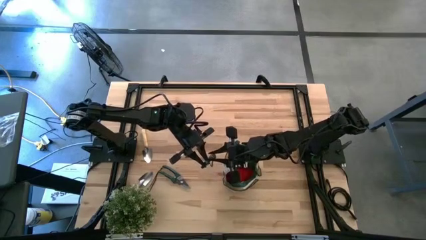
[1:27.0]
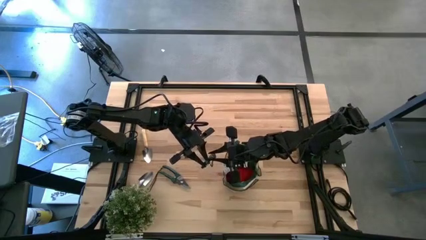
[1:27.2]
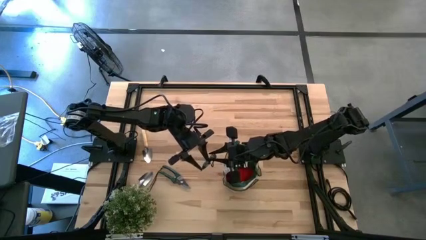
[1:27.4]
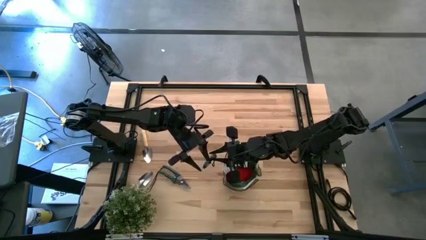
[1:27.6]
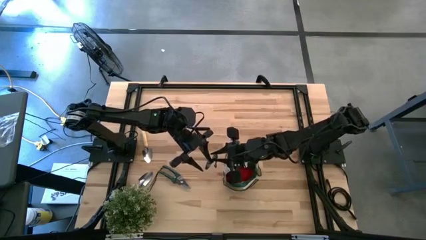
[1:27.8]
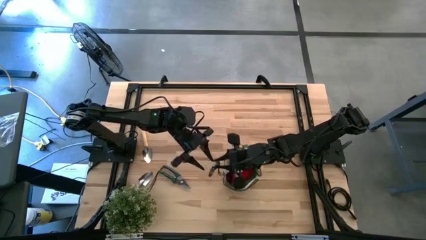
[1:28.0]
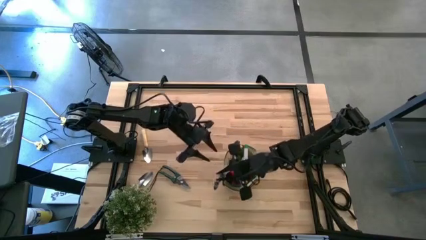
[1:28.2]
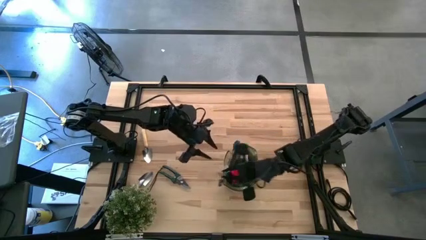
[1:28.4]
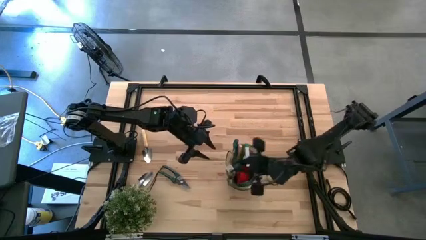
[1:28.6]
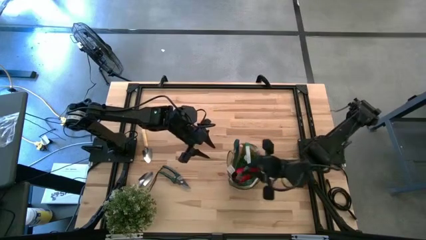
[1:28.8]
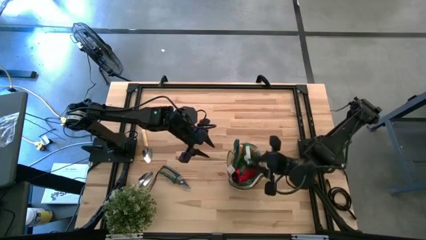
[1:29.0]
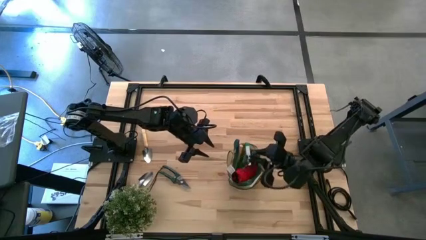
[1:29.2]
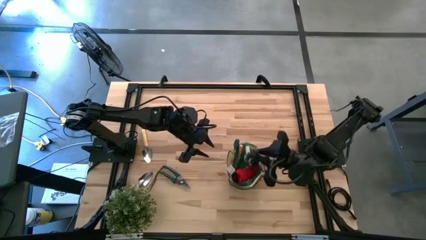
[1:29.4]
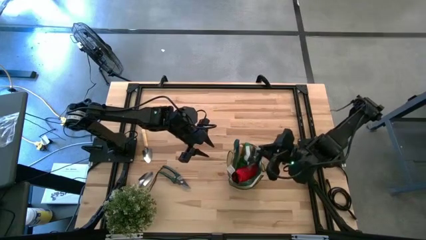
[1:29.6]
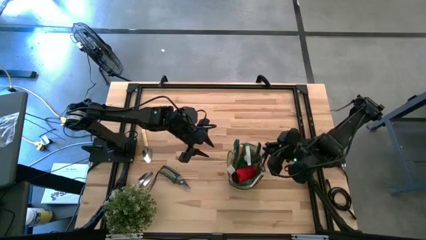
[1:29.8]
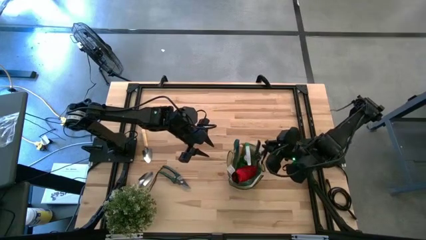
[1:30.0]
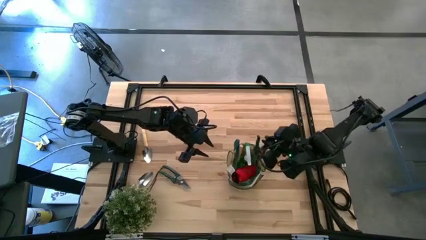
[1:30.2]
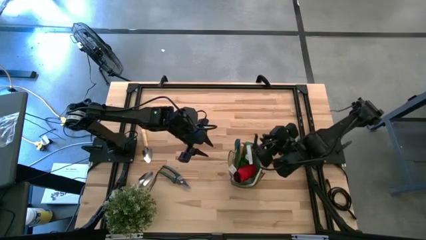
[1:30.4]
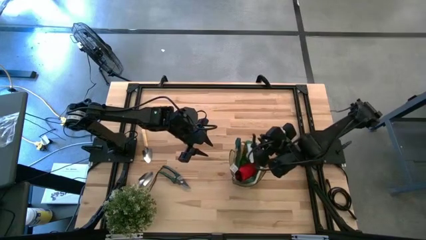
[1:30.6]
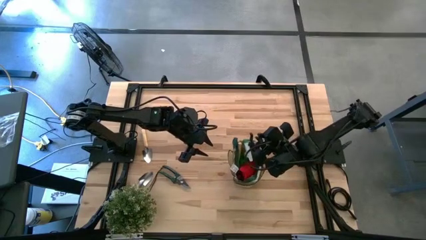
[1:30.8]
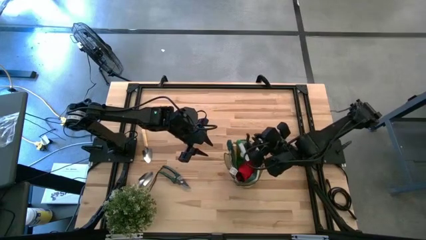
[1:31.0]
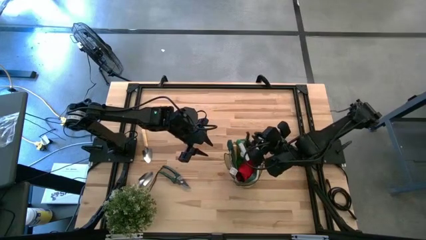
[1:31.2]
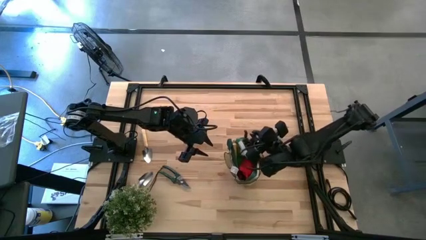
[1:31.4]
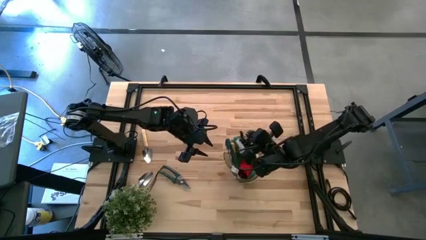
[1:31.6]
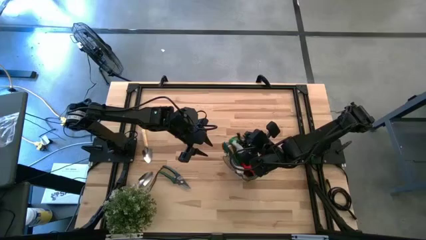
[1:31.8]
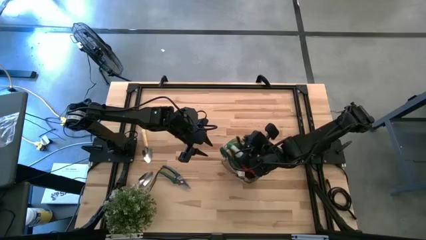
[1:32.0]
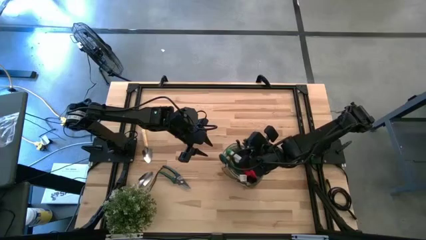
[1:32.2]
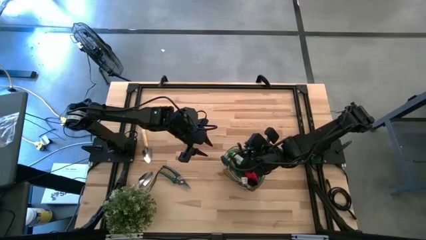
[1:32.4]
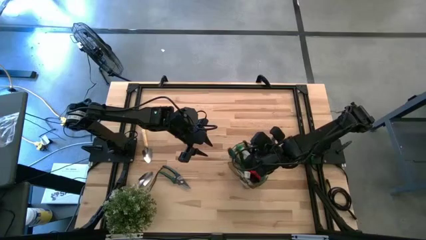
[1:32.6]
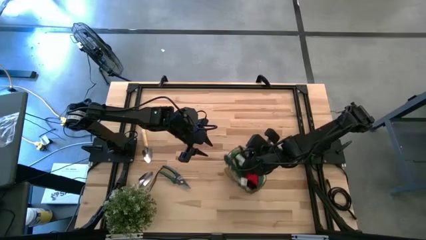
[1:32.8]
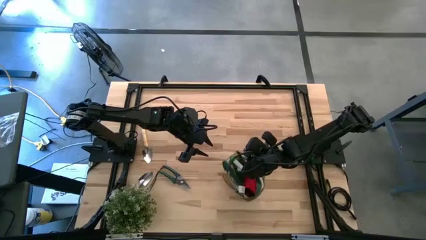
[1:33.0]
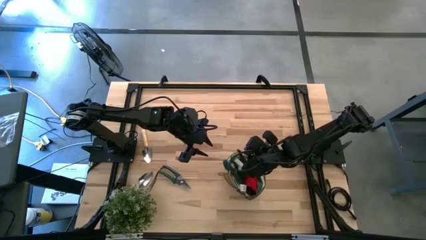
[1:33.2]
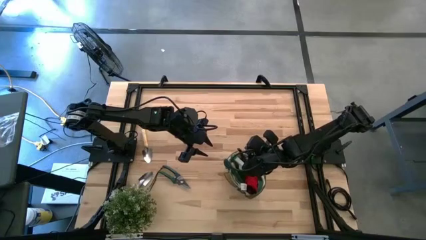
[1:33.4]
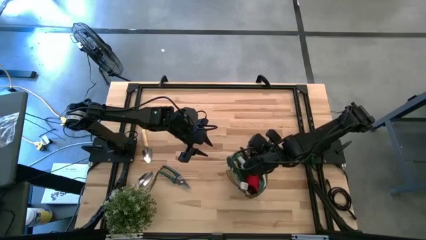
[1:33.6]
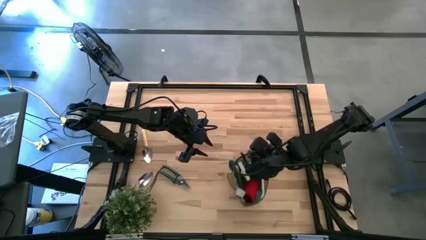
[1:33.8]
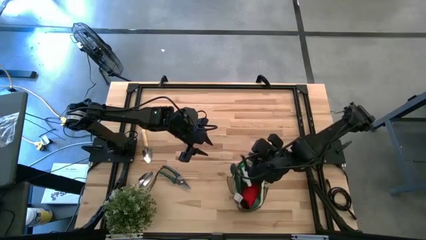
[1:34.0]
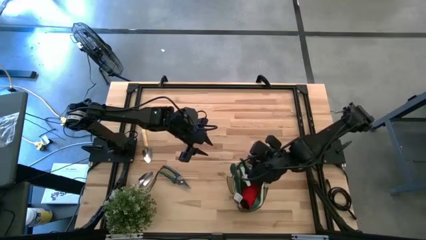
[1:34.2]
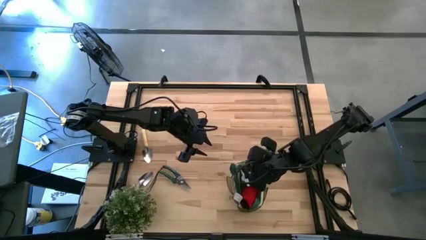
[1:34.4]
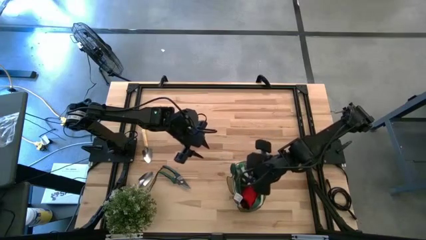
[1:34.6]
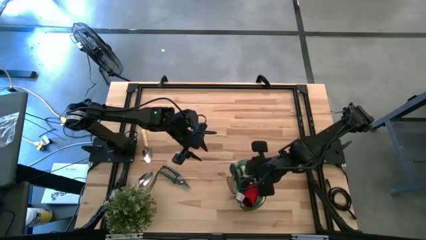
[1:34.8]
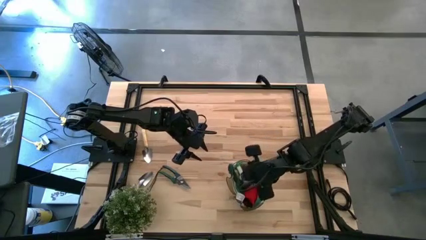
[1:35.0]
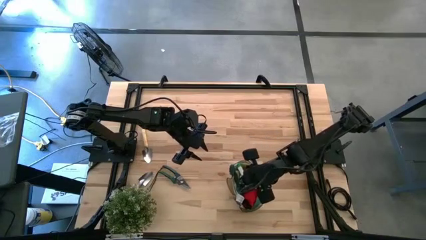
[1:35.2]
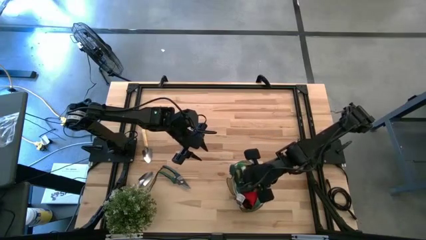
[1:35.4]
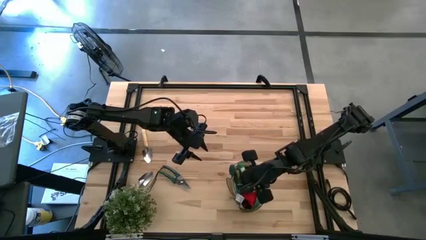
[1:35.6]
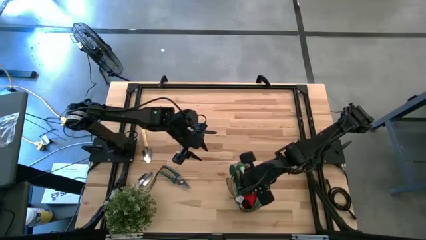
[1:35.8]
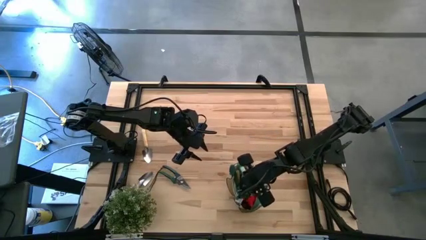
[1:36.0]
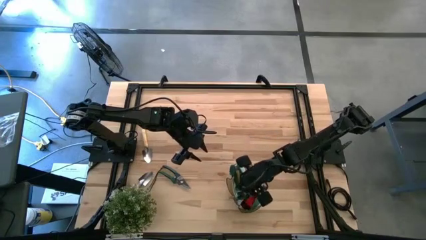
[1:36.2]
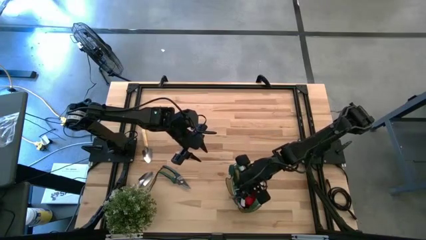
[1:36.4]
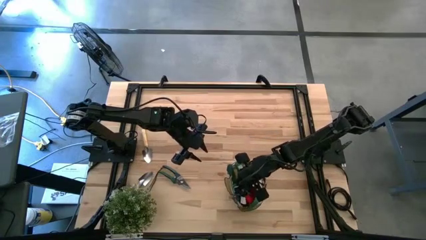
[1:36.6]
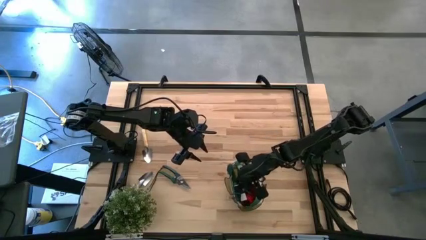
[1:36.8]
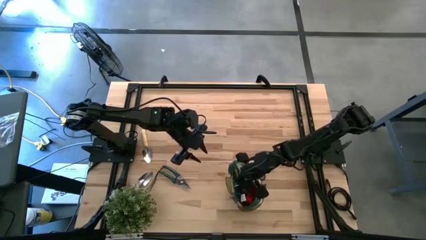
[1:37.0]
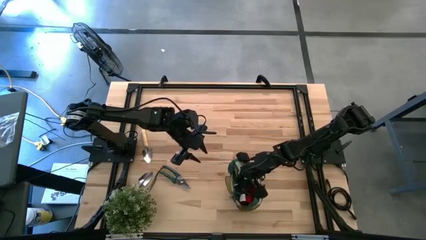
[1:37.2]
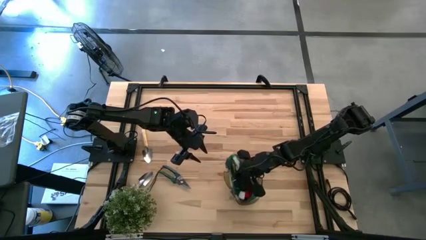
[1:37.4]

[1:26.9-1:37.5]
Task: Pick & Place Garden tools in Gardening bag
Put the top green shear scissors into the green gardening bag

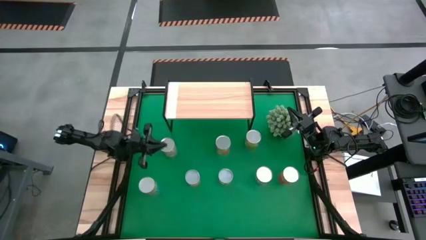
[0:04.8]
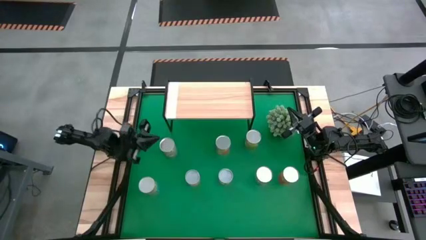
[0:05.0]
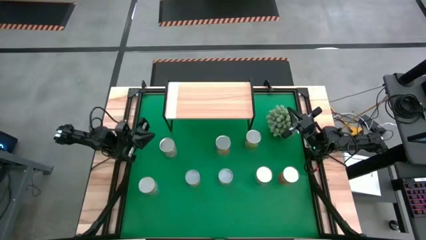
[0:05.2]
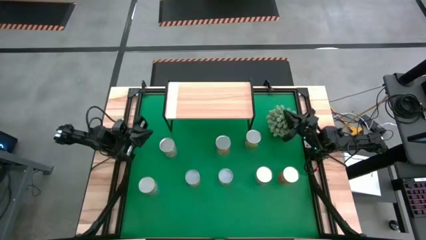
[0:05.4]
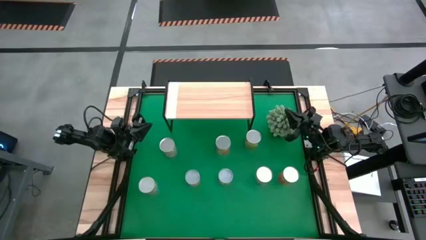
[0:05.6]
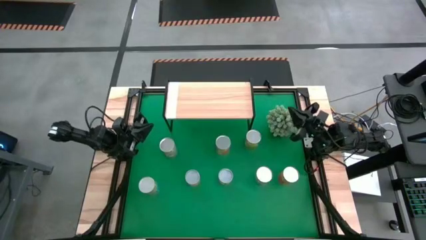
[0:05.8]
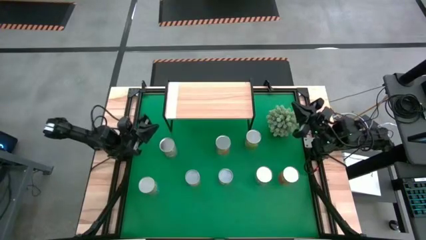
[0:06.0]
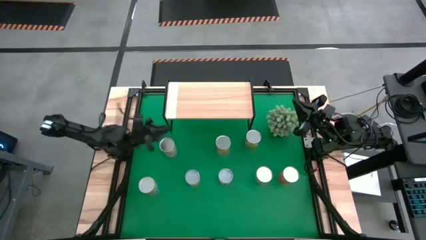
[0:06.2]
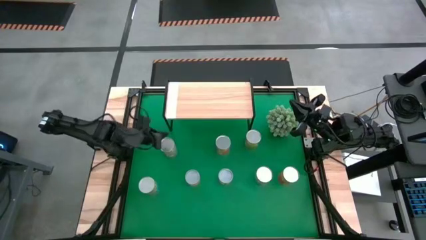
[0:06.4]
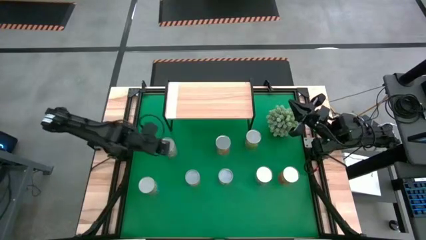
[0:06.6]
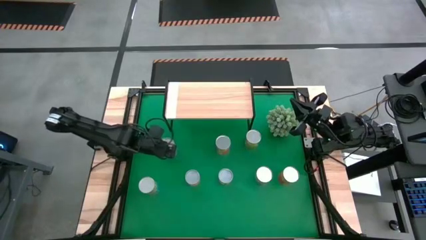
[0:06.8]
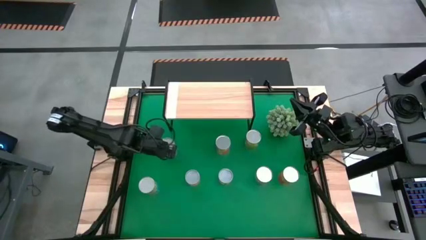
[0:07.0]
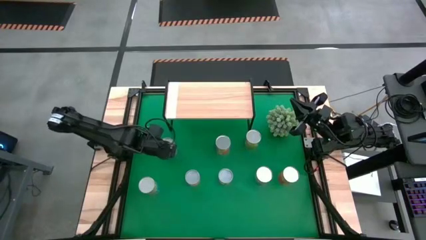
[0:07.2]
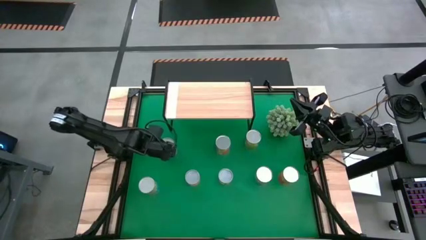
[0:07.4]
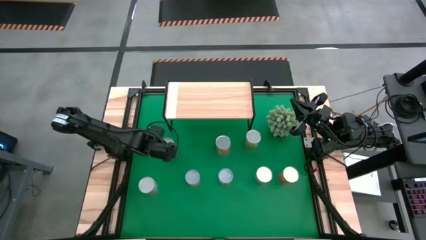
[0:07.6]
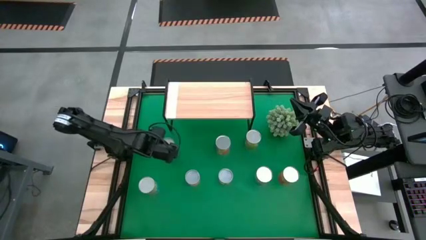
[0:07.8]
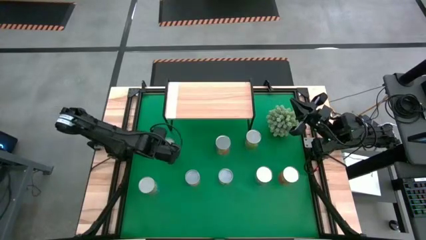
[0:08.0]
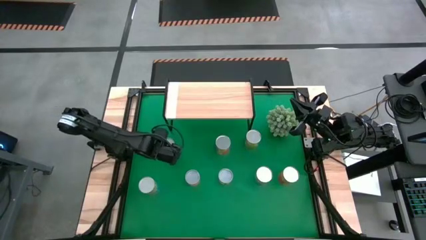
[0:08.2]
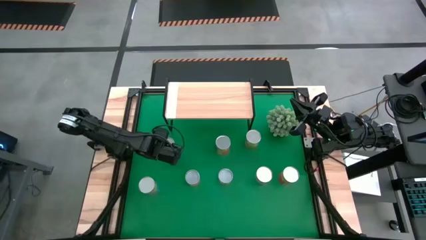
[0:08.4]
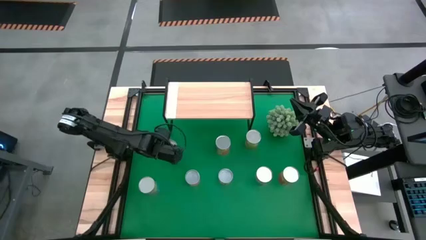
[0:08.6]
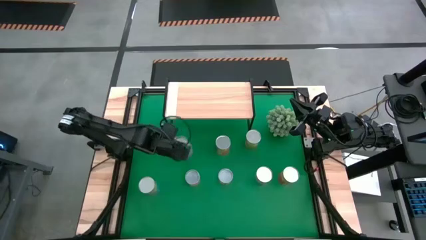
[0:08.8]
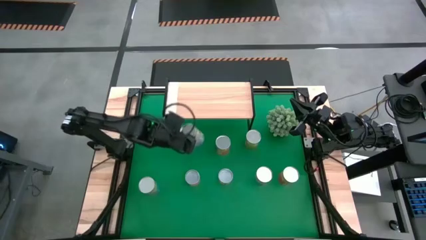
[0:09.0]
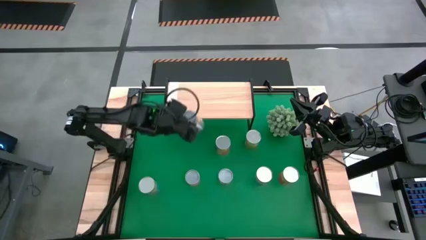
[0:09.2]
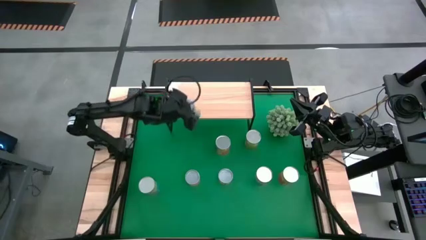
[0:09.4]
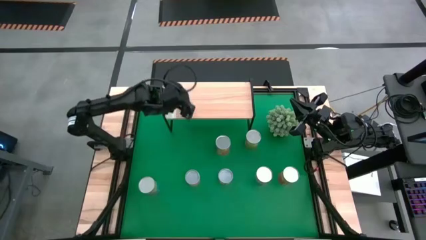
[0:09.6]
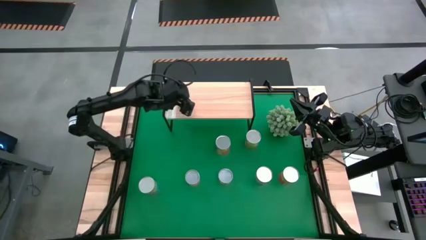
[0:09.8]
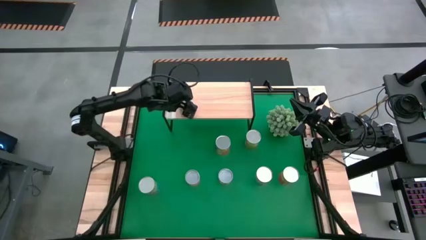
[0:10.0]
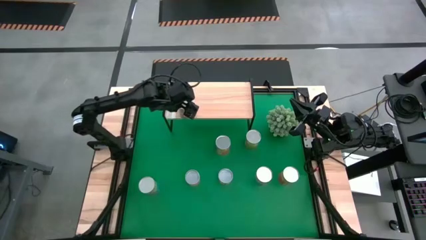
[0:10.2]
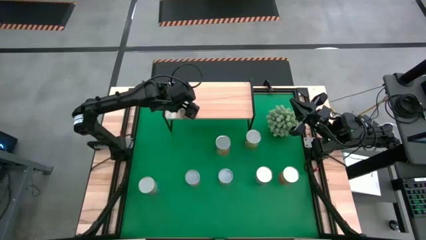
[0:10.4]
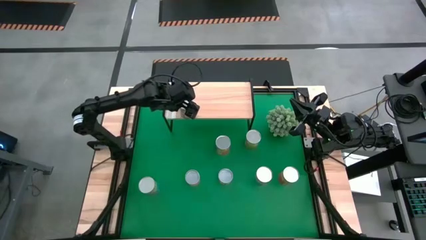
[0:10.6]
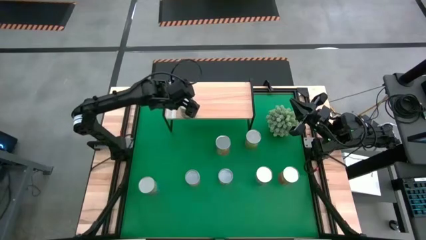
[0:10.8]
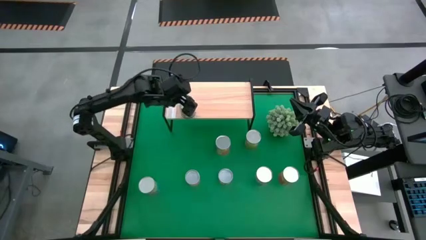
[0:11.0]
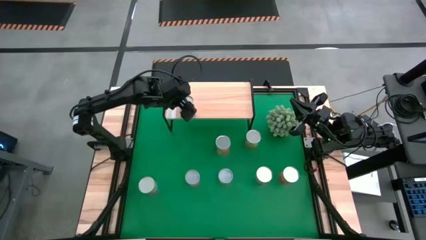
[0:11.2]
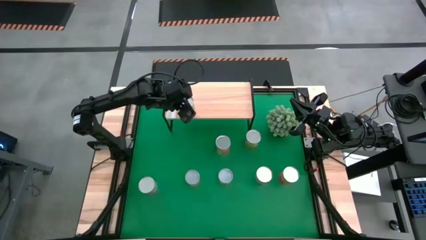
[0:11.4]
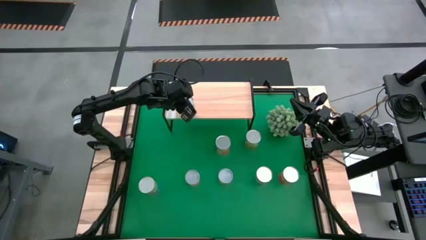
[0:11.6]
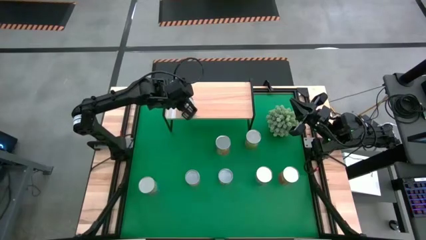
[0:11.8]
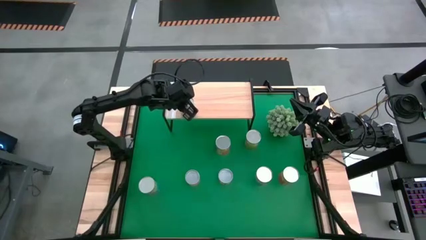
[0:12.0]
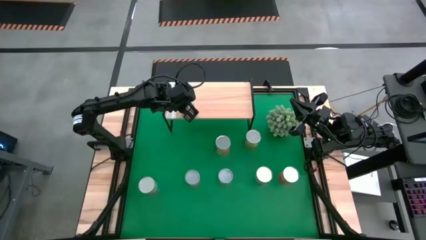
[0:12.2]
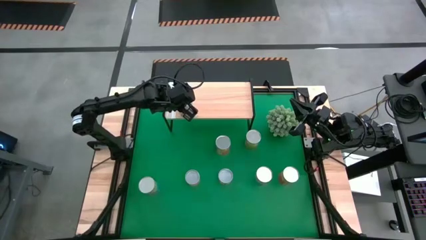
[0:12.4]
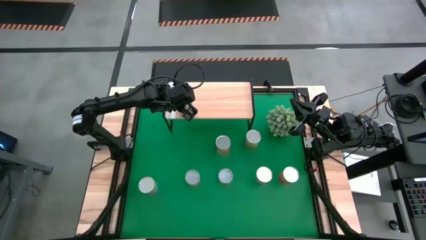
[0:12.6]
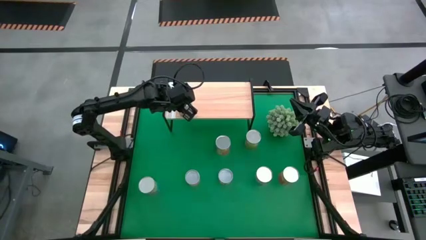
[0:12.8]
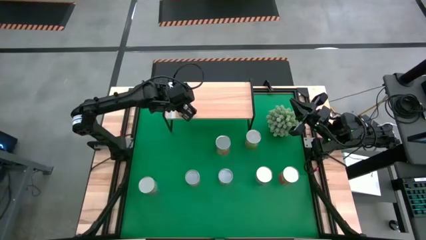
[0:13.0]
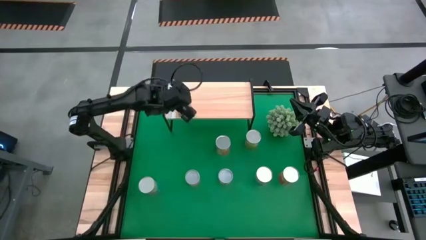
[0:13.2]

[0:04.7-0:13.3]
Task: Pick and place cans onto a shelf
Put the canned peaches on the shelf
